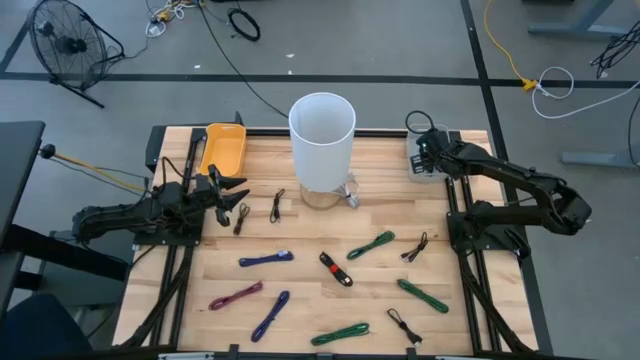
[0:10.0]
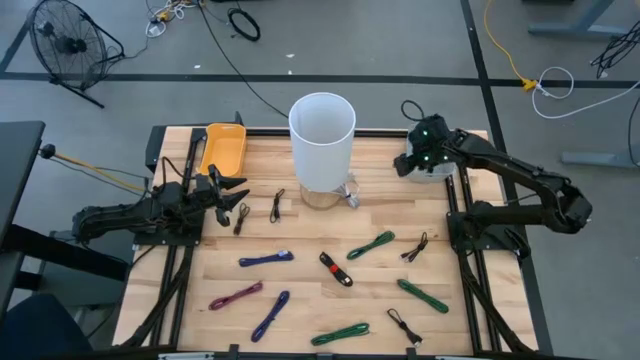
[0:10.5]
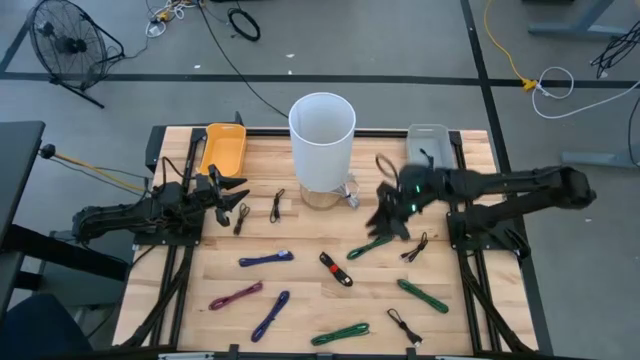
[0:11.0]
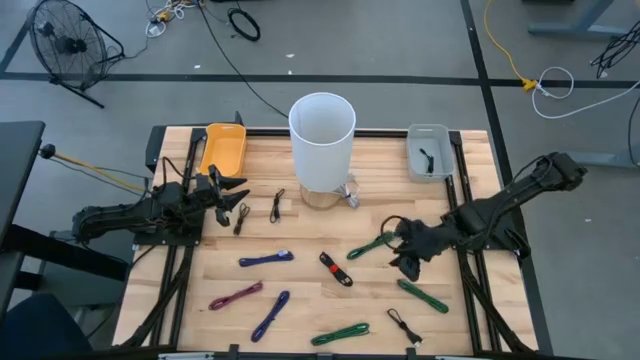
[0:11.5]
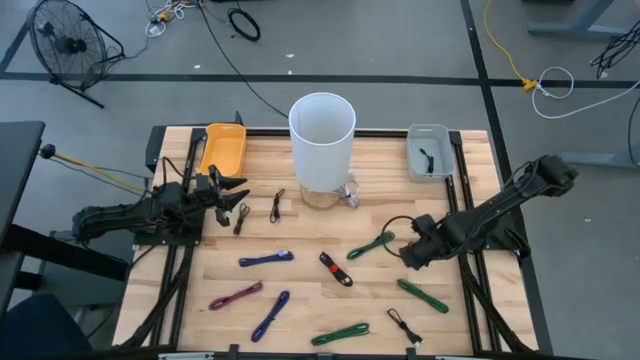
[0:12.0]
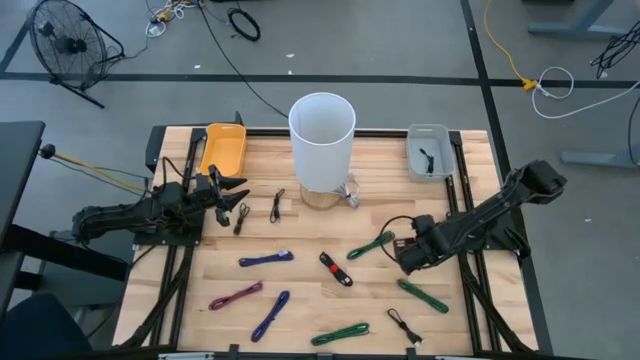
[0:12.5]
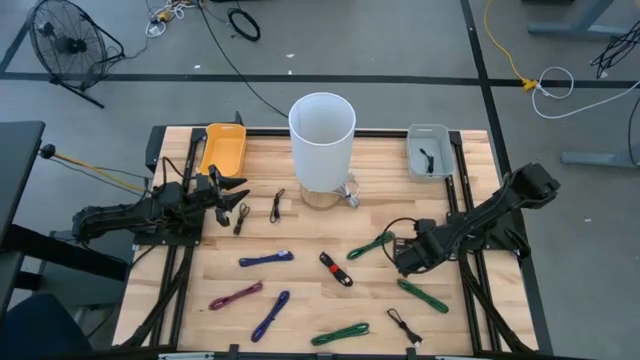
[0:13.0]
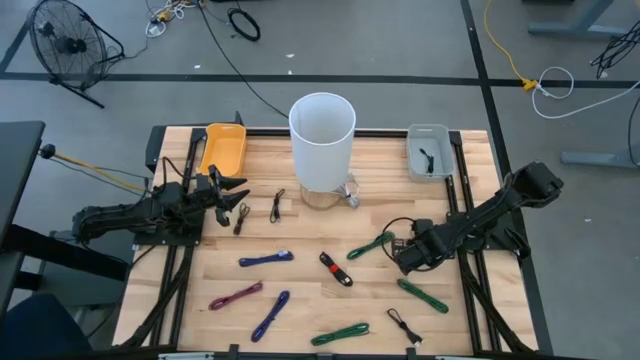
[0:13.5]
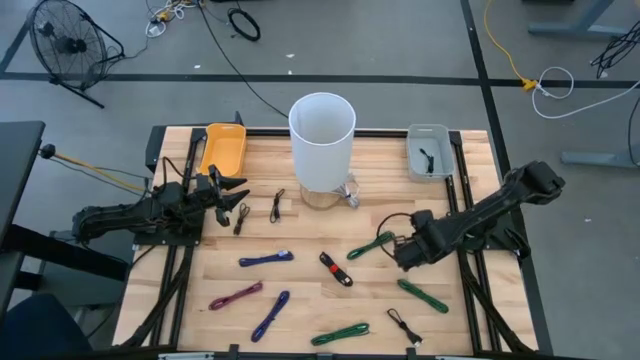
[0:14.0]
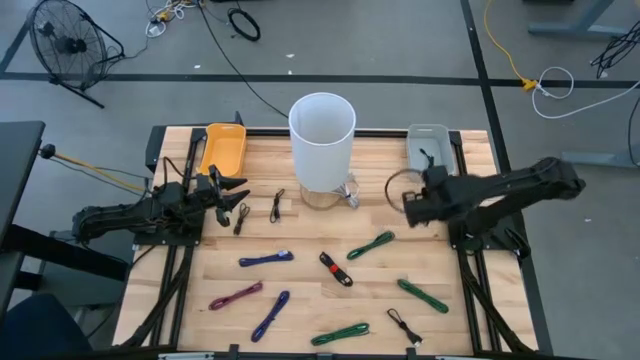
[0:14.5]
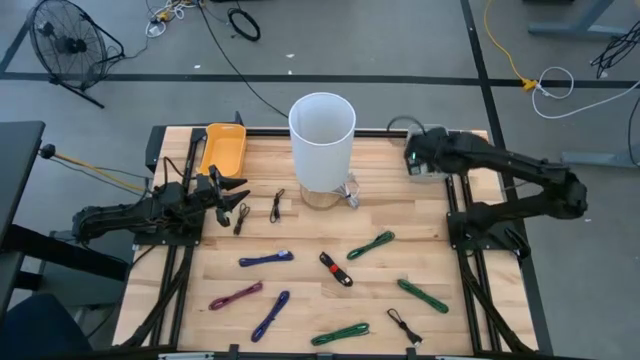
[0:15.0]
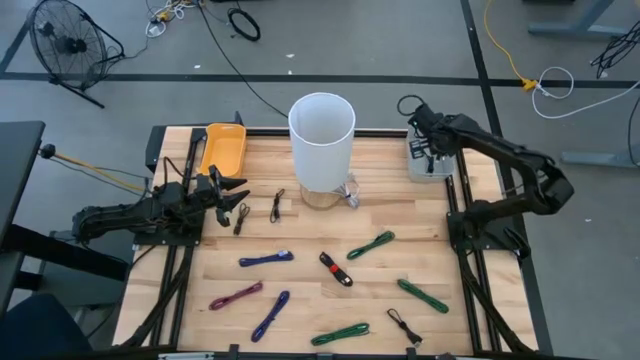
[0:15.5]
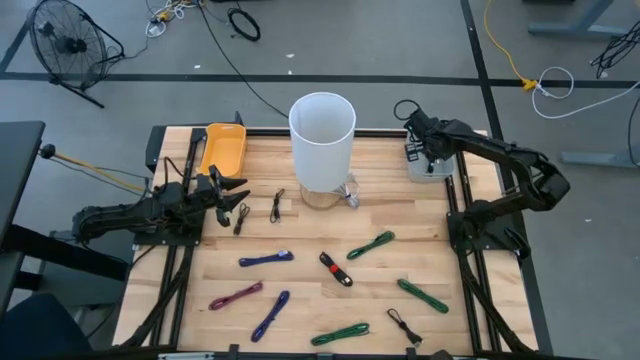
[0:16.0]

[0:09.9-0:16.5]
Task: Pick & Place USB Port
Put the black USB cable into the gray bin

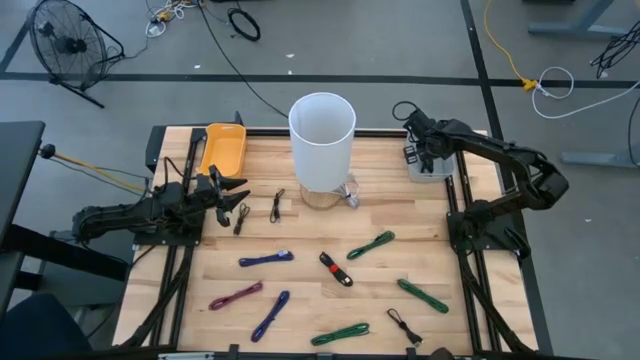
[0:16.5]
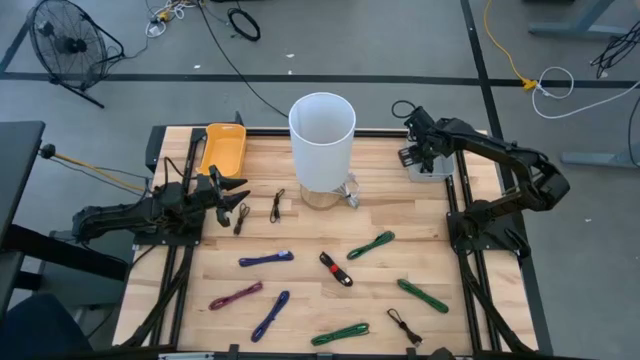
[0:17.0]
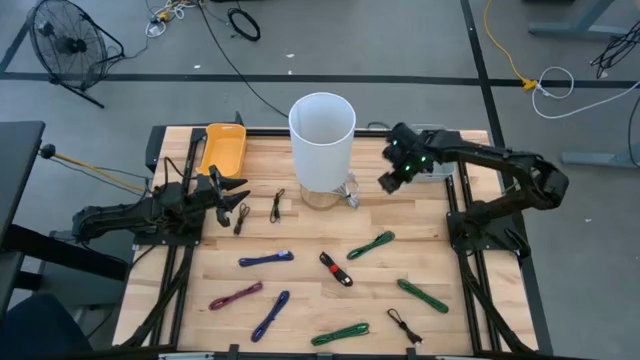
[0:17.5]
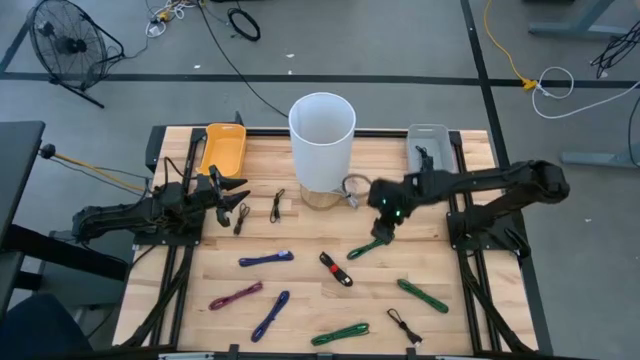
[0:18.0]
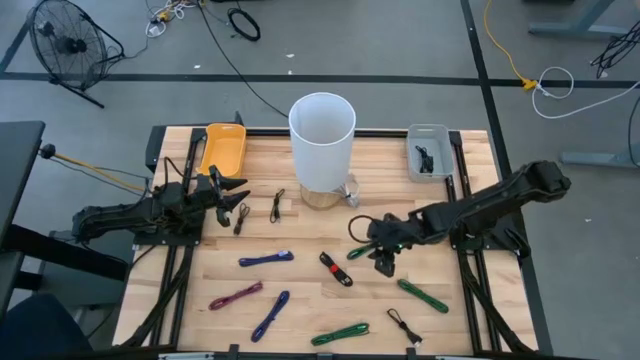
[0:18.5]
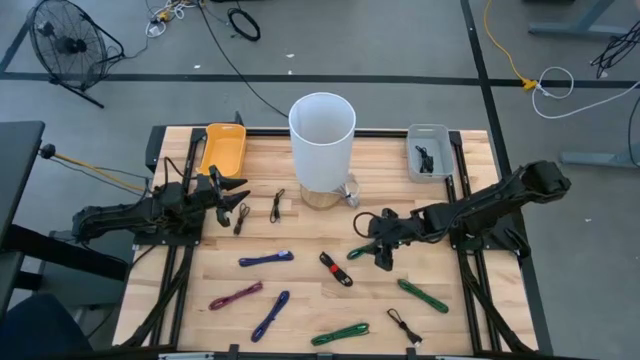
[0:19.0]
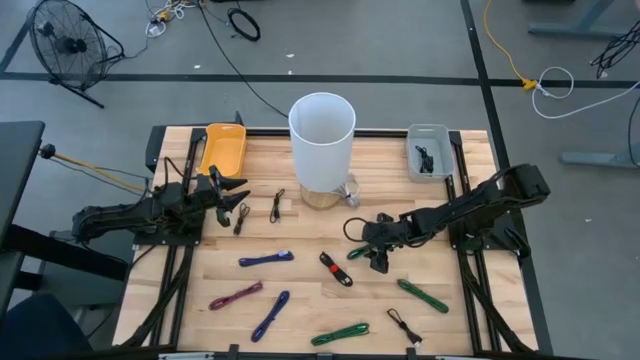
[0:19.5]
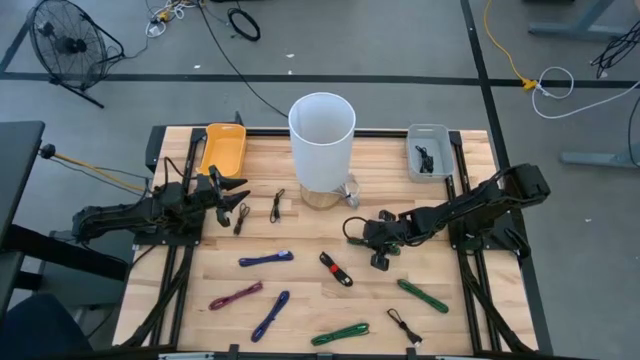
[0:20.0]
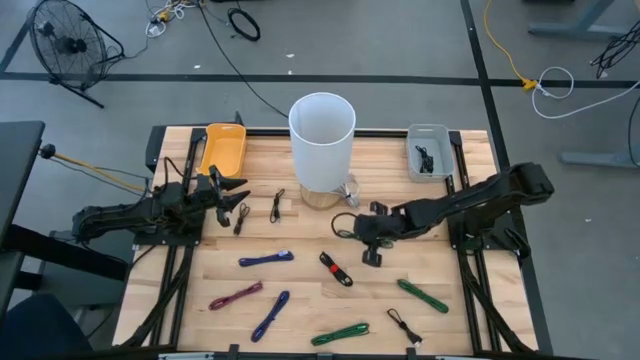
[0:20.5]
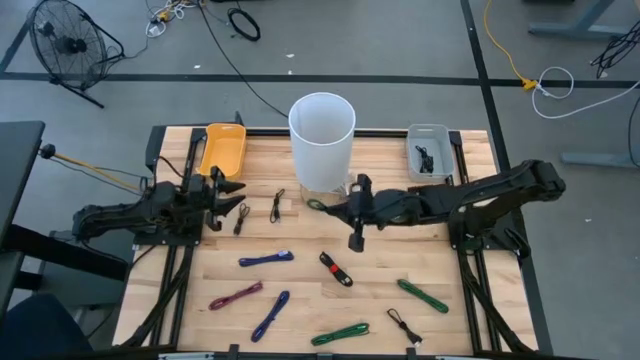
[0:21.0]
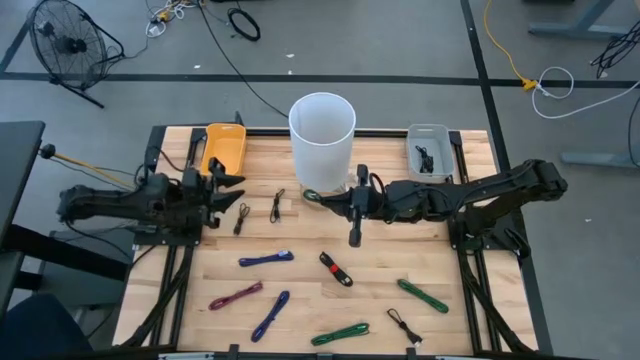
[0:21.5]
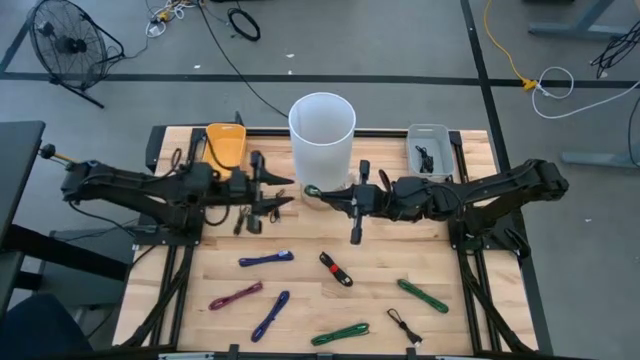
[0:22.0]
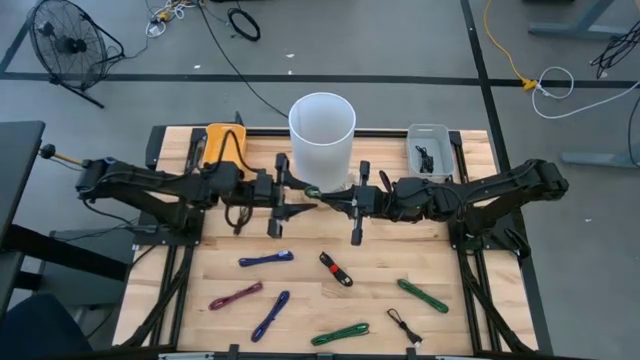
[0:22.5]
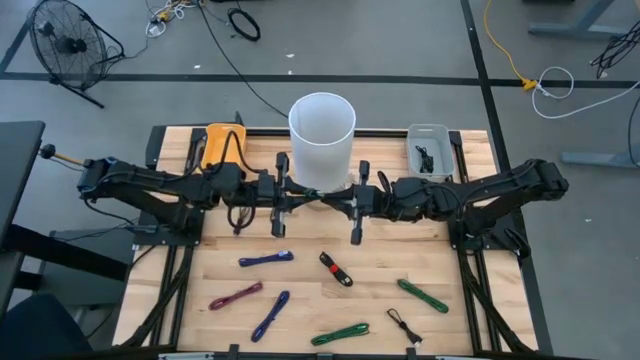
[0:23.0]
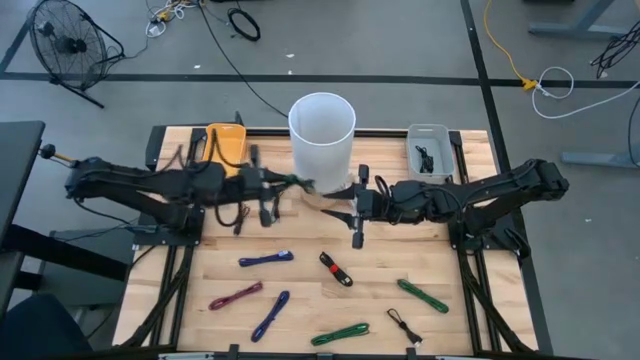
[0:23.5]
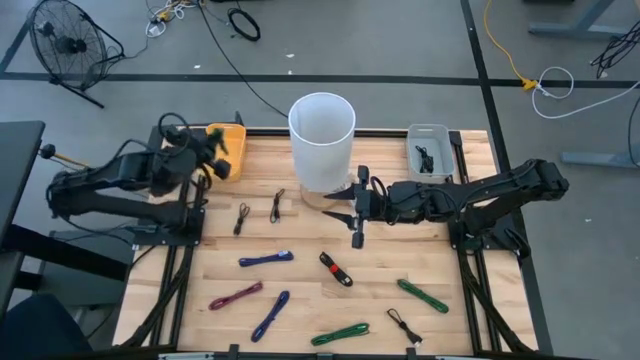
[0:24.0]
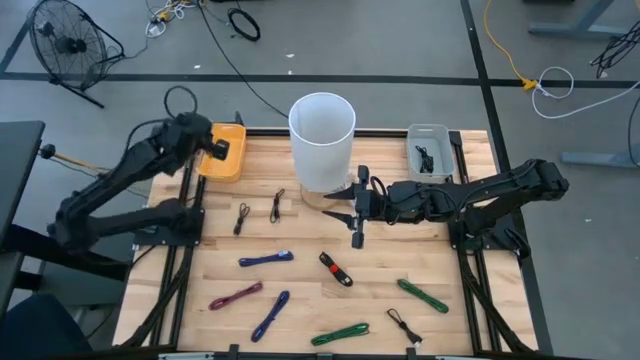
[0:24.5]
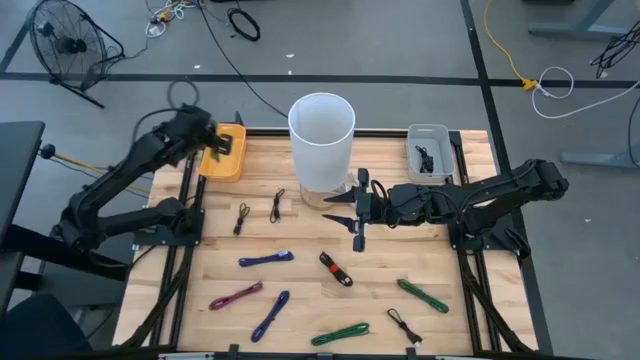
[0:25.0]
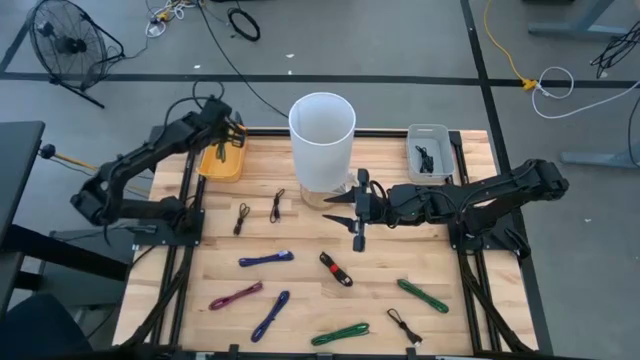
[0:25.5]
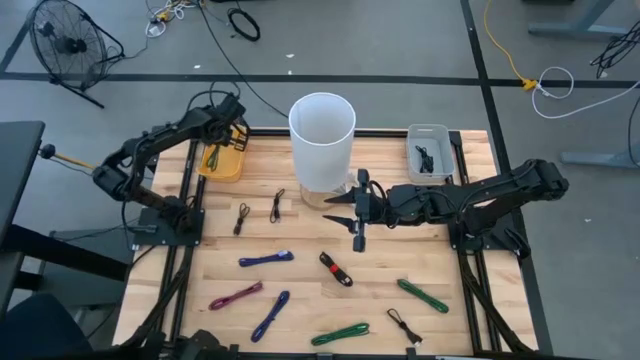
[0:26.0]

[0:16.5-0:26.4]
Put the green USB cable into the yellow bin

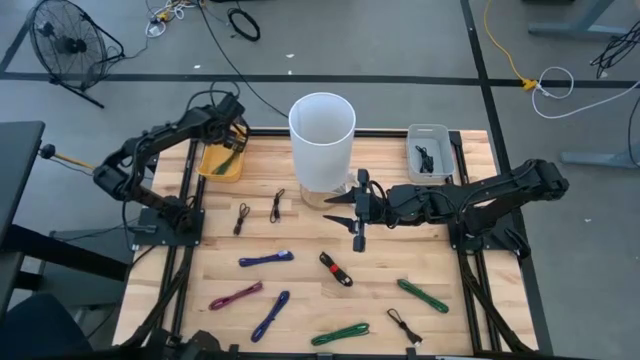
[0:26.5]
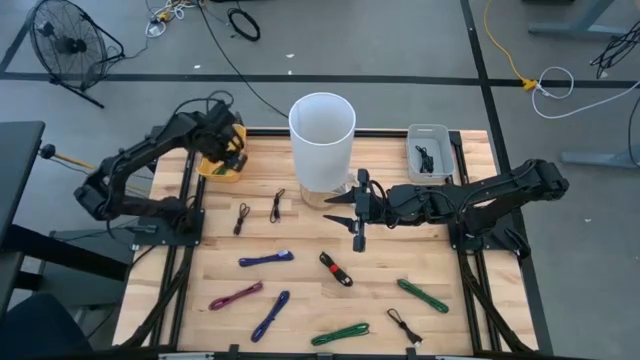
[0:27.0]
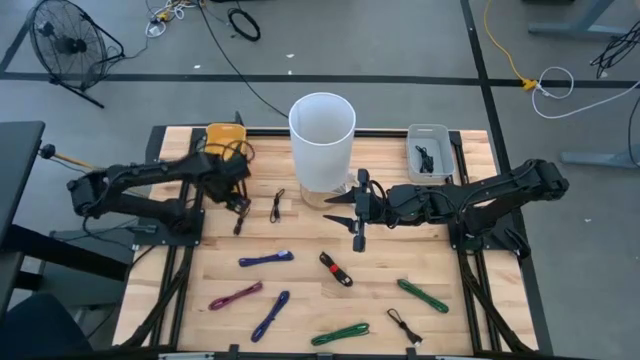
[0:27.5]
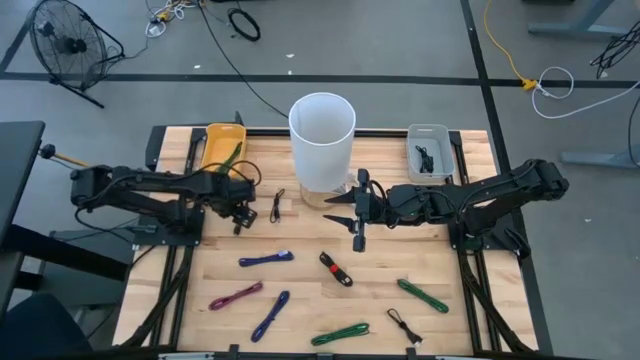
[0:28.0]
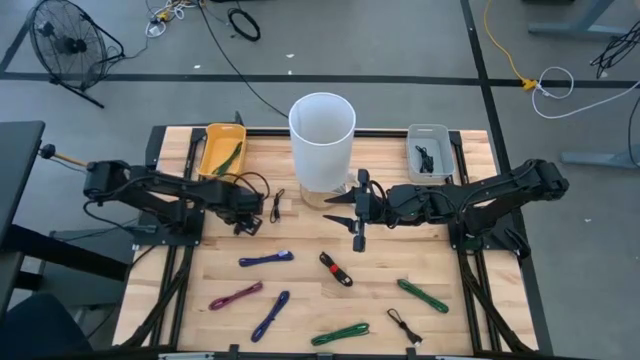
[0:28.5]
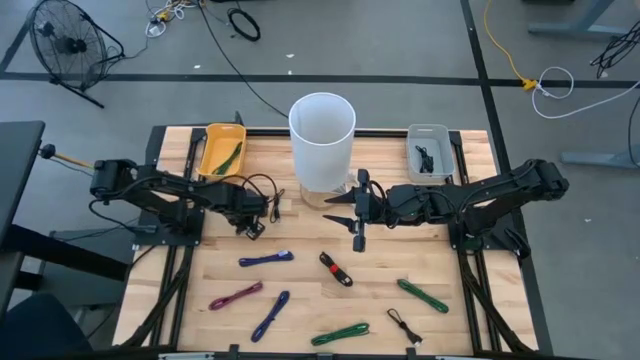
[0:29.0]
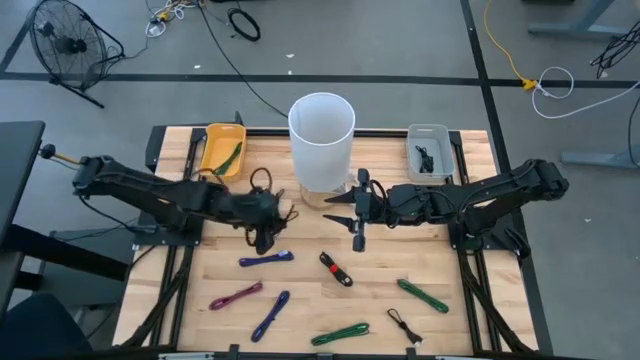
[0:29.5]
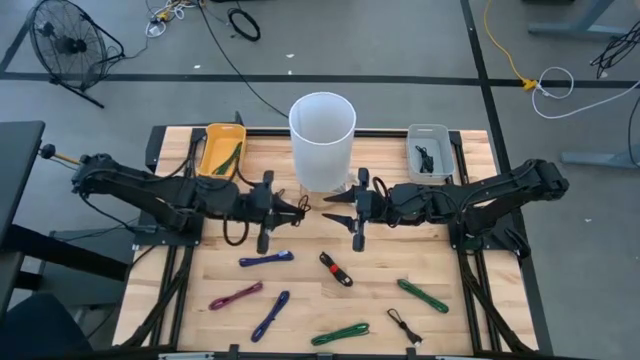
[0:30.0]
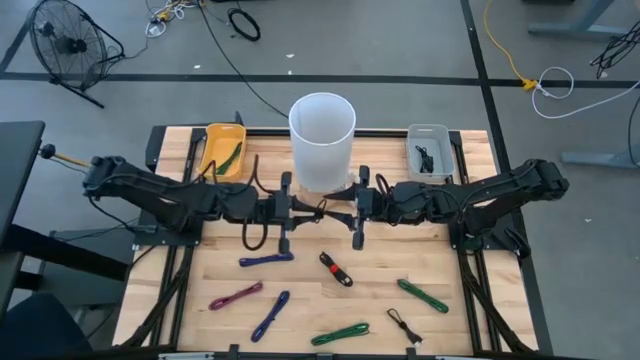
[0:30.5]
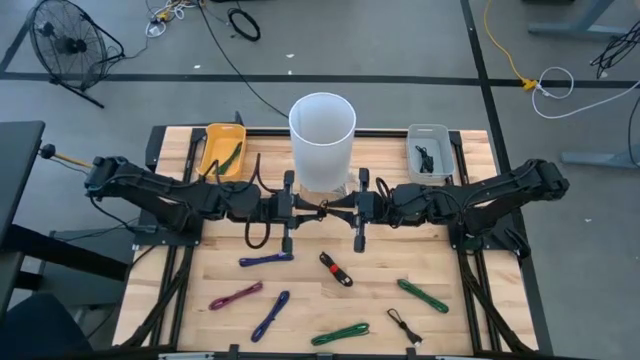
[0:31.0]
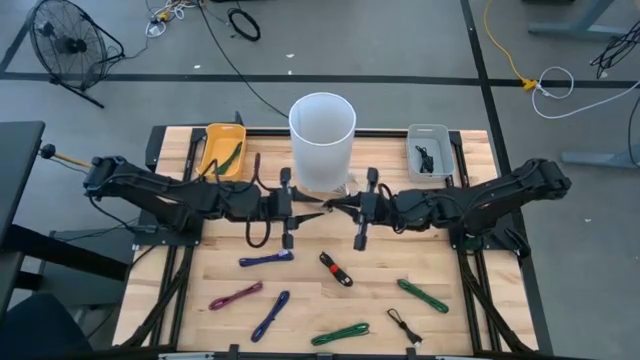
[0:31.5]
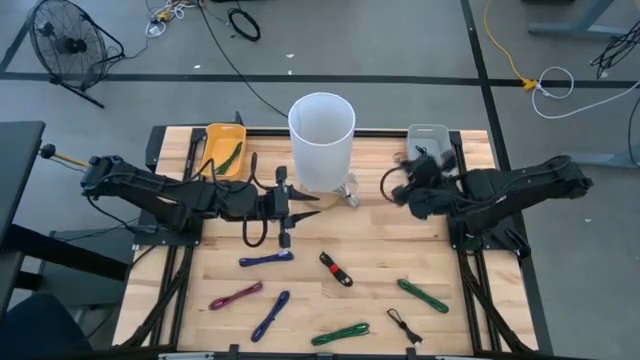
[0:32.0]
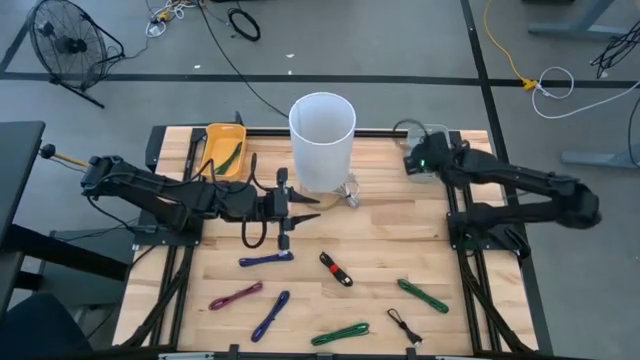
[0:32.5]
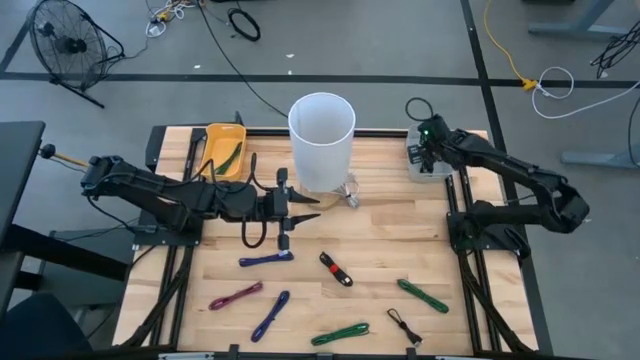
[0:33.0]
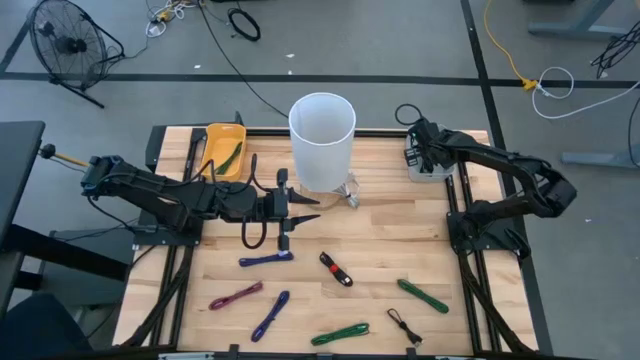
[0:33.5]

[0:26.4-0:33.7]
Put the black USB cable into the gray bin
